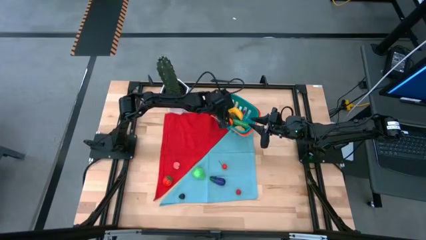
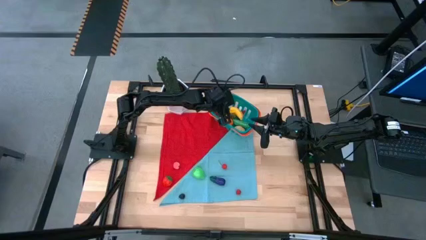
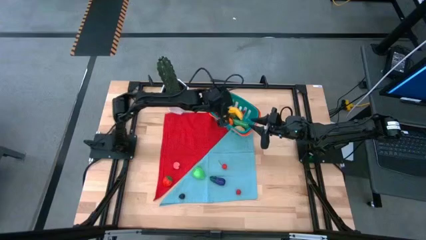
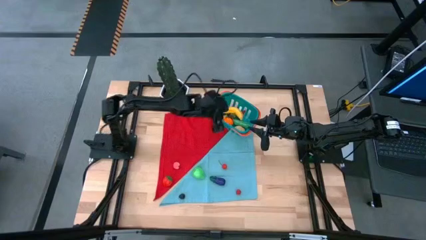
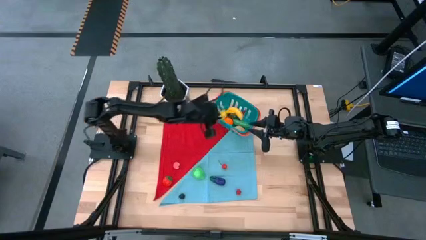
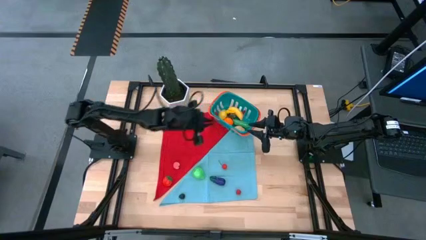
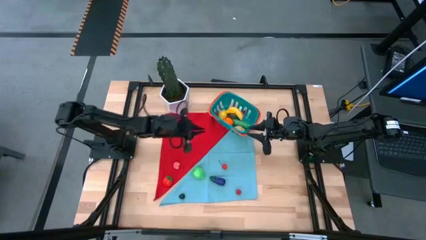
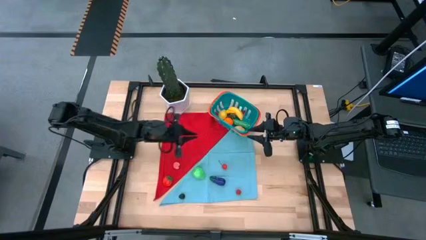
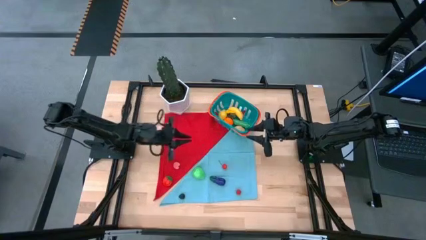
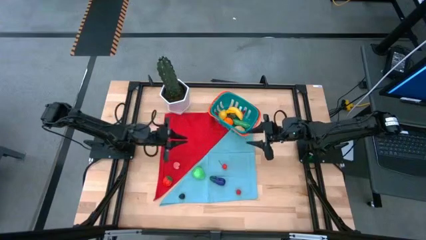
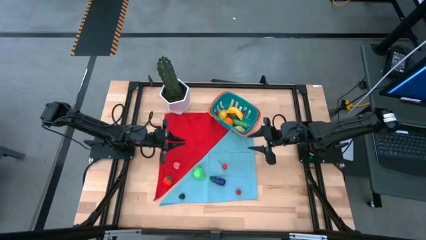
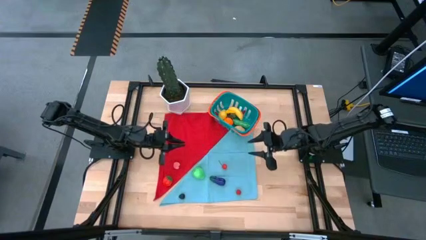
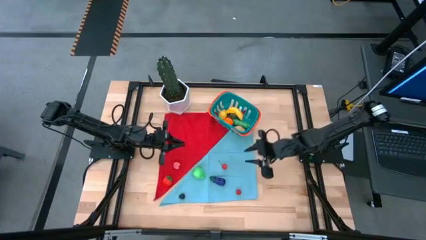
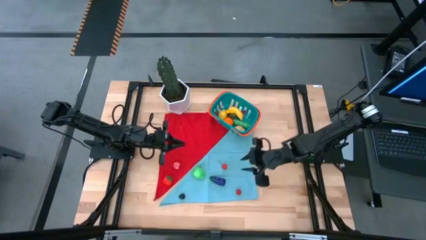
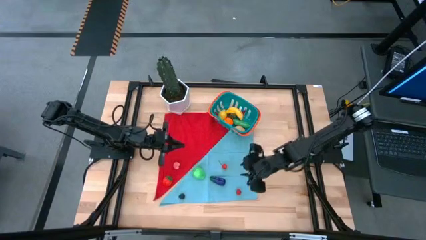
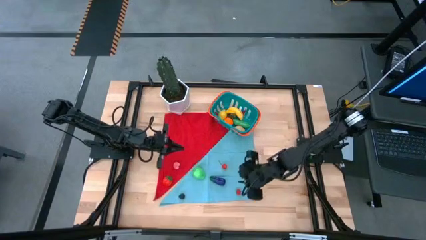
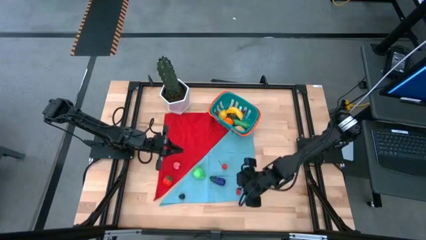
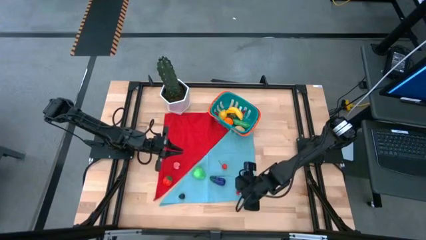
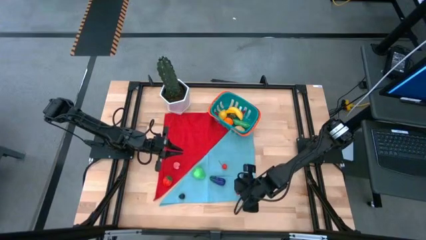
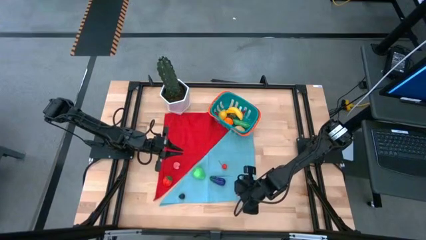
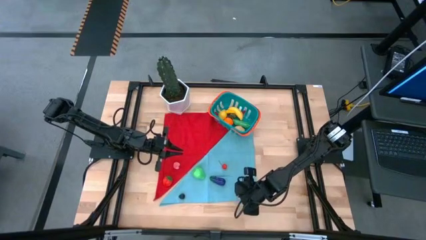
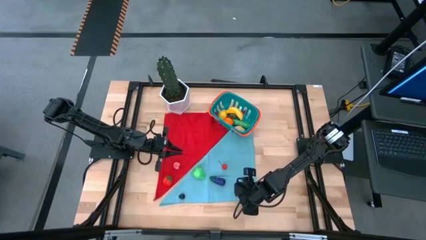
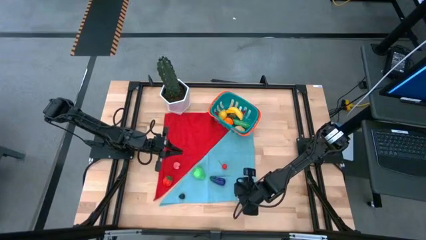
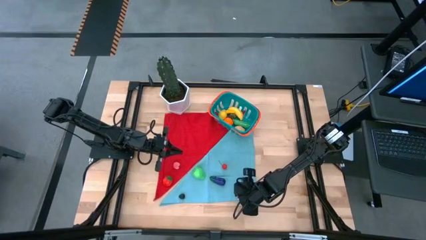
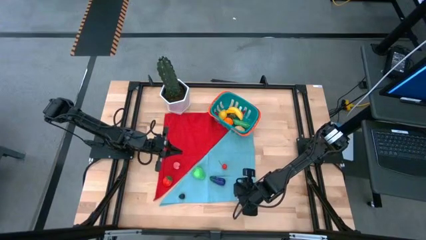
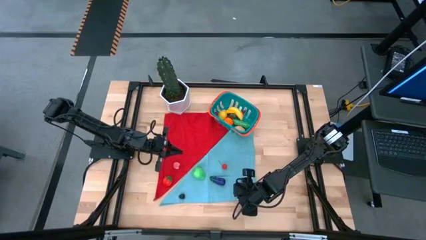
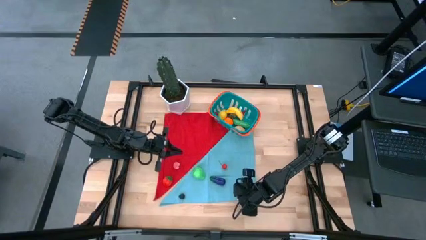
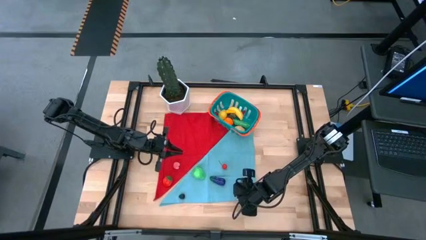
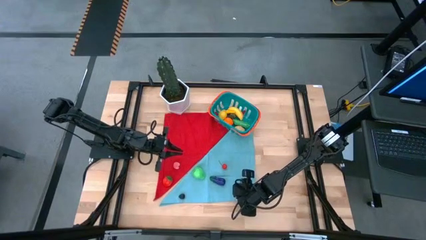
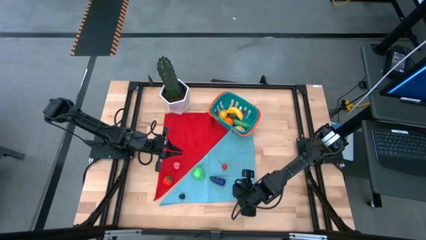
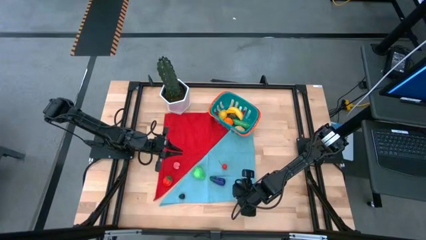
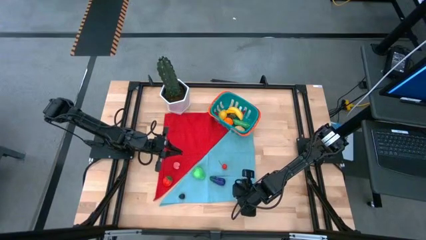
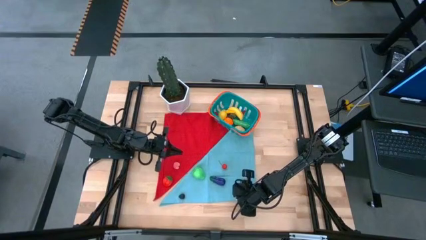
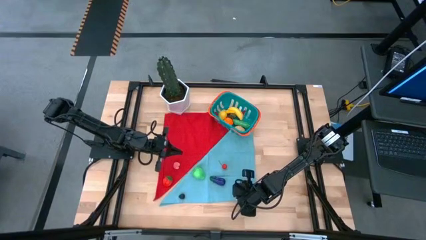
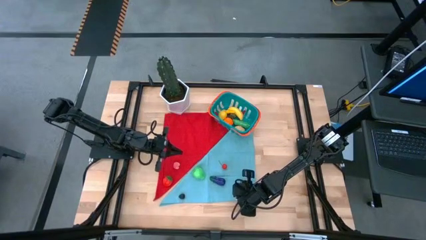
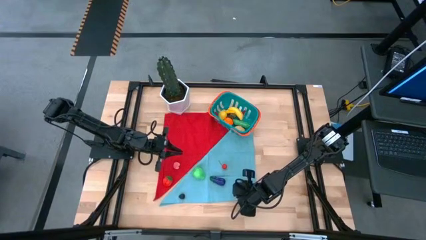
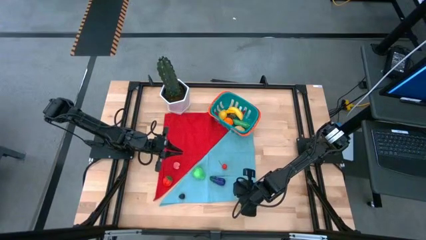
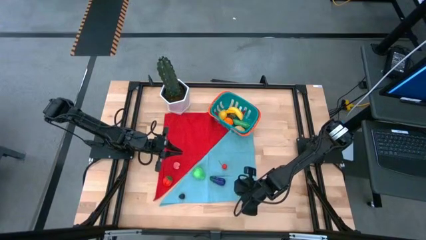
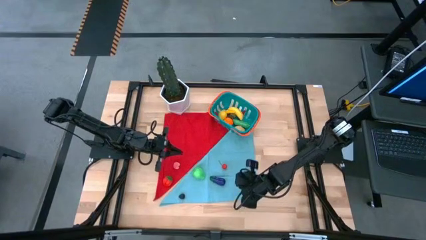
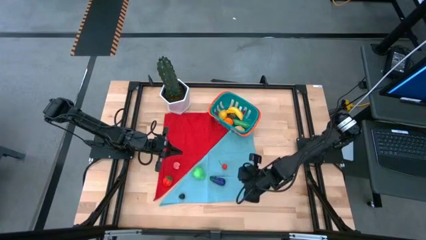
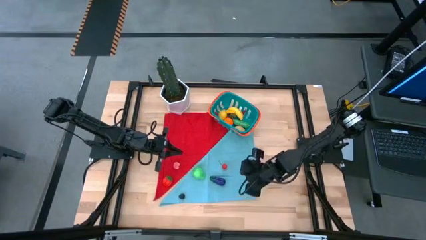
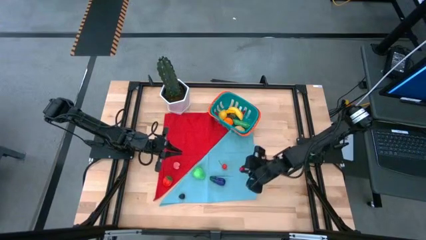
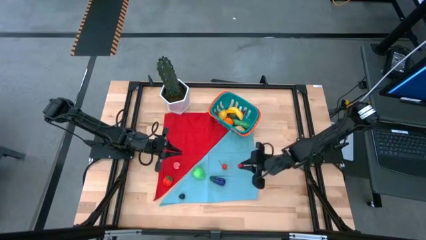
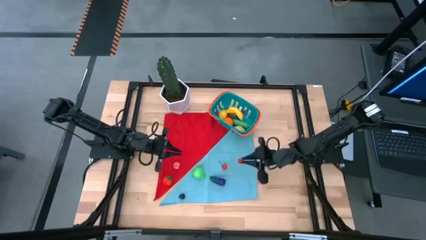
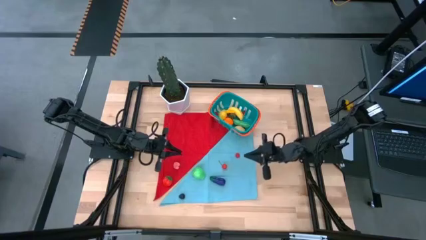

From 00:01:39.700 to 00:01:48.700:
Task: Pick and placing Produce into tupperware
Put the red raspberry into the blue basket

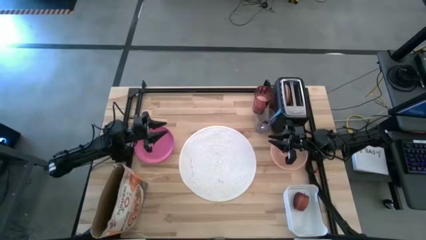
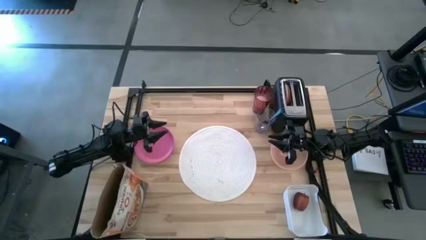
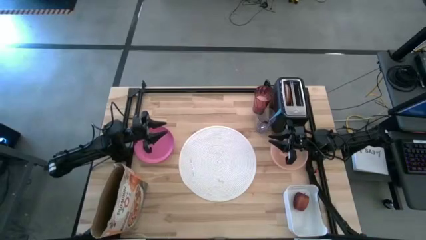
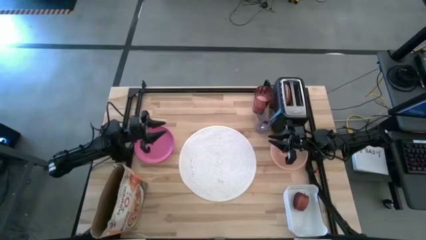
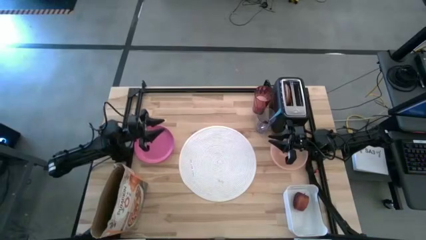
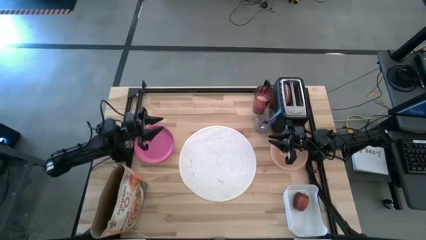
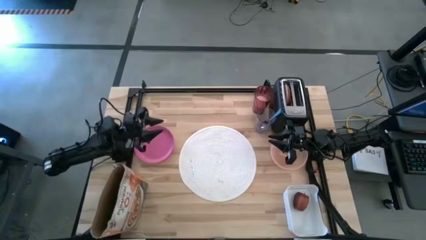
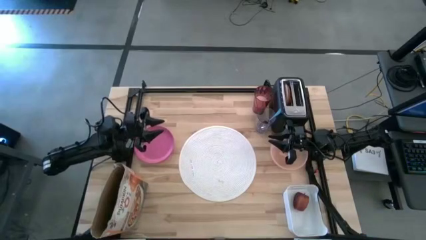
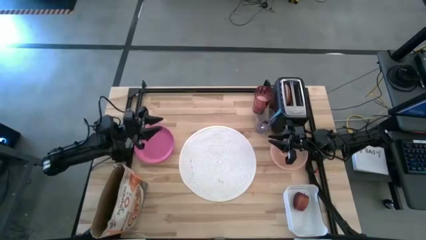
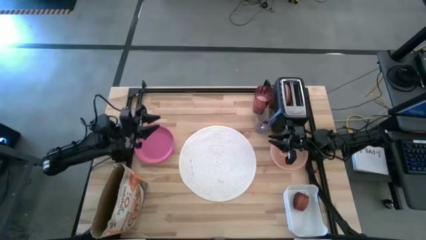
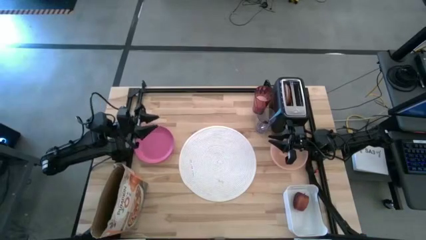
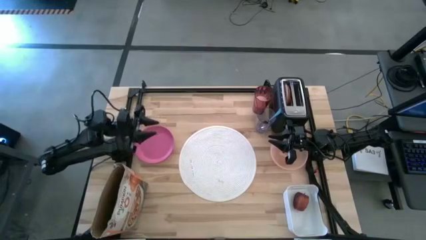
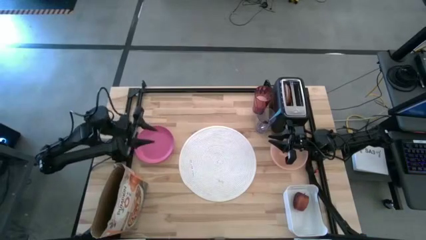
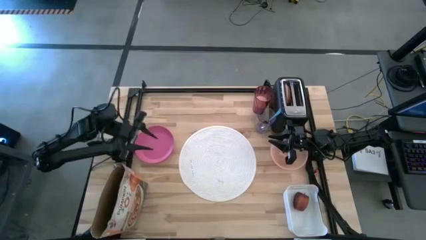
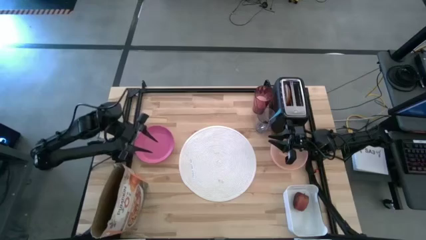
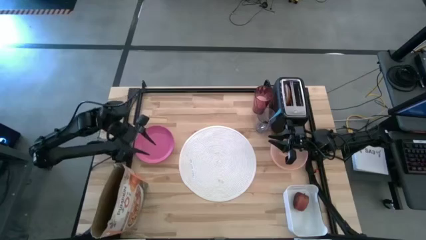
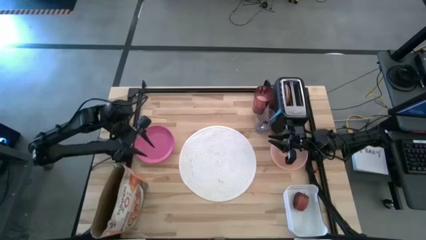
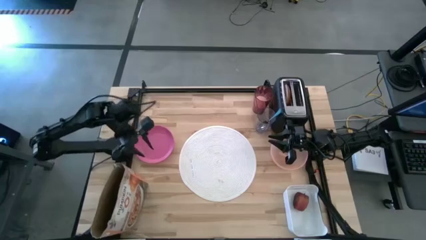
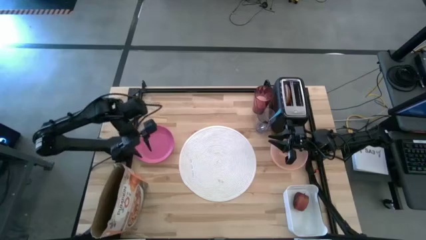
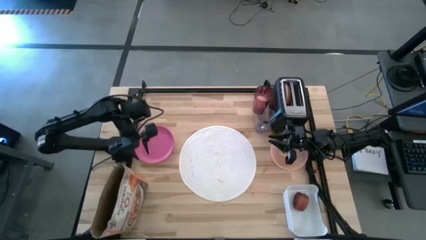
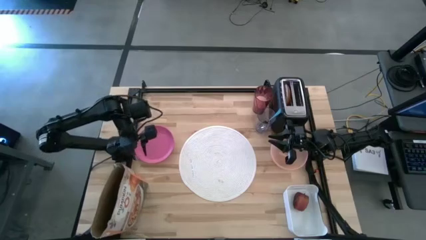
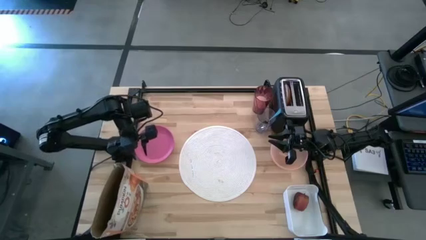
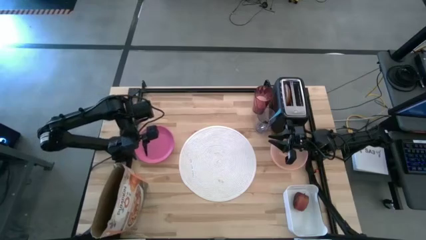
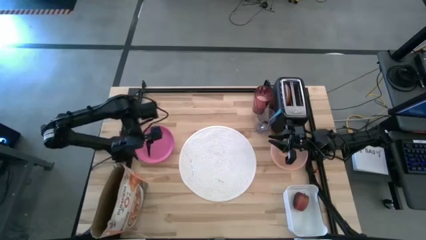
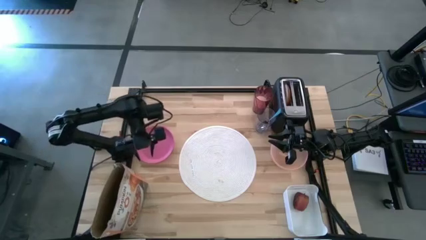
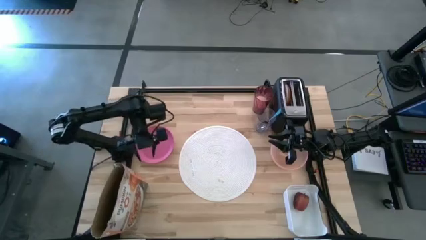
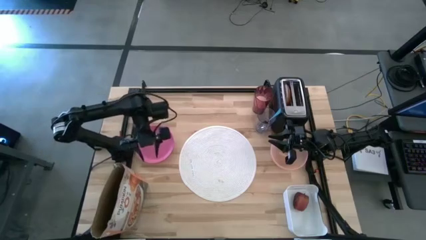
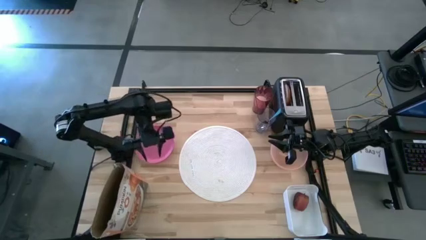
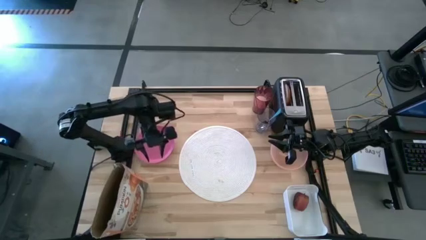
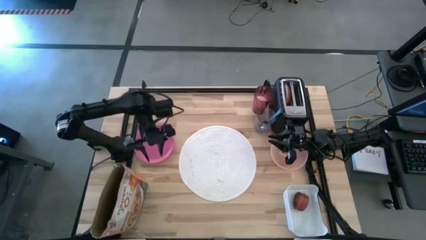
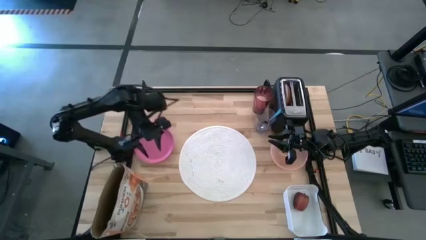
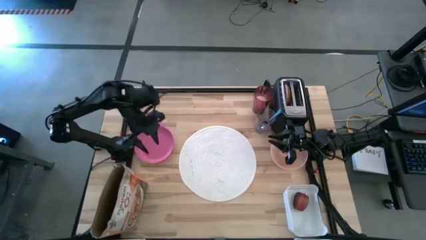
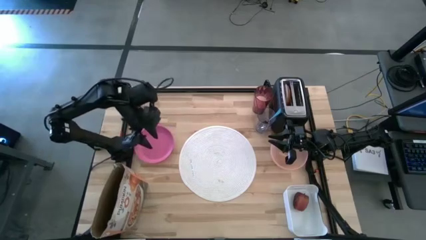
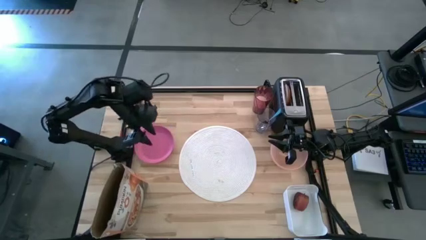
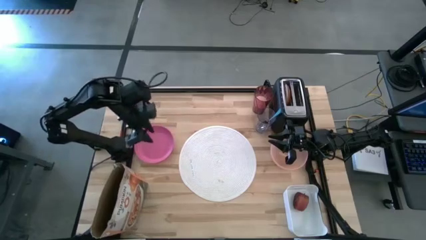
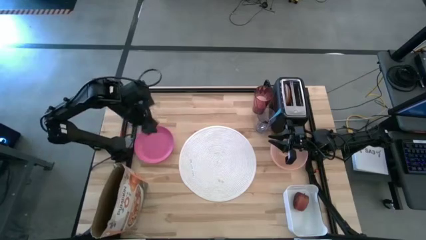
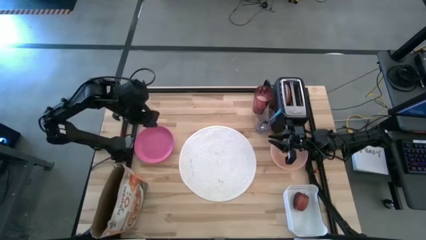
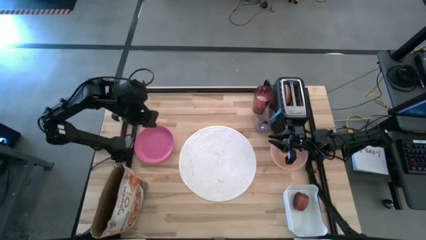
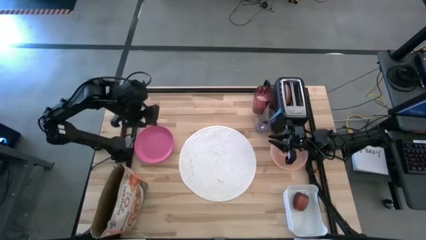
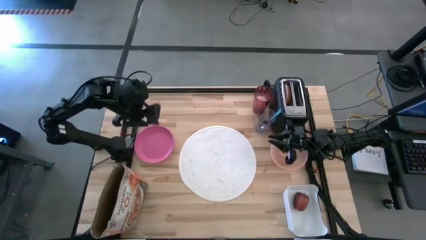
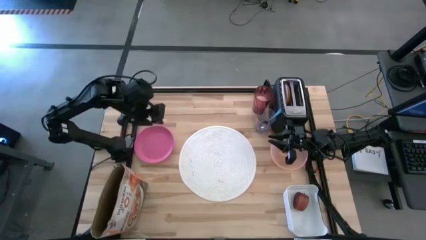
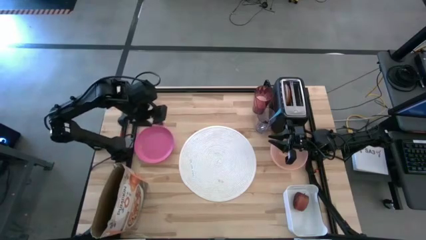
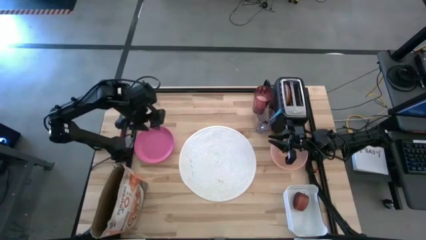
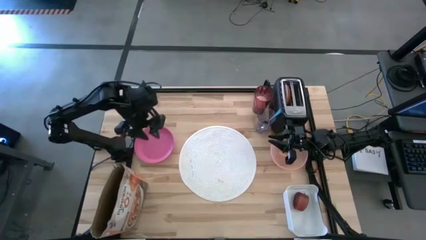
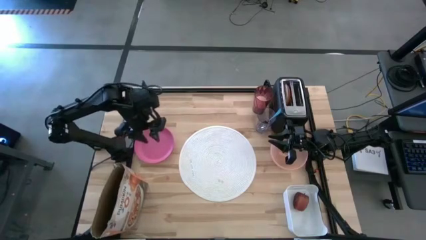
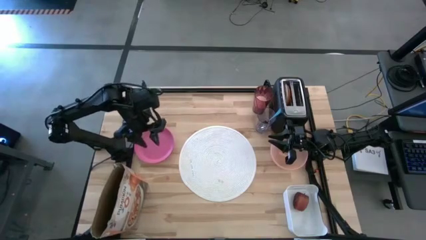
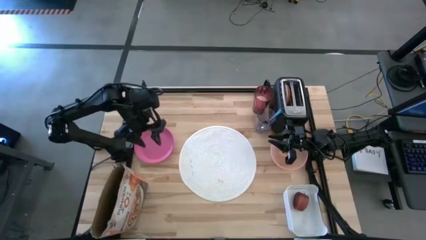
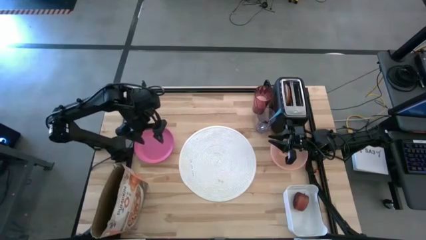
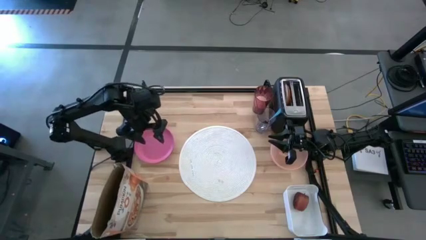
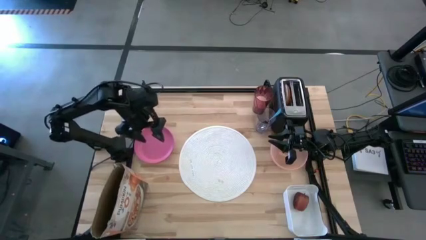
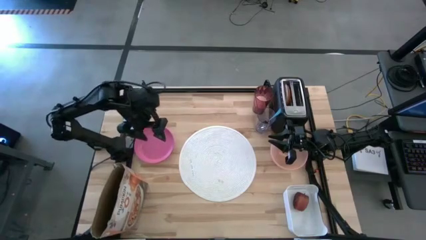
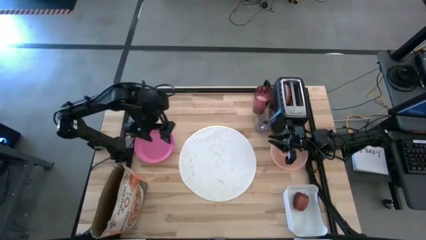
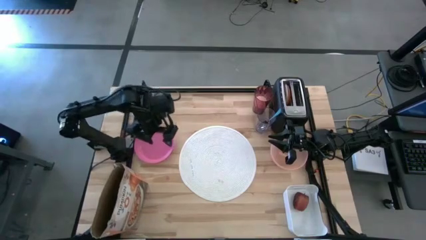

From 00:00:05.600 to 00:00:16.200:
Task: Arrange a breakfast setting
Move the cereal box to the top center of the table
